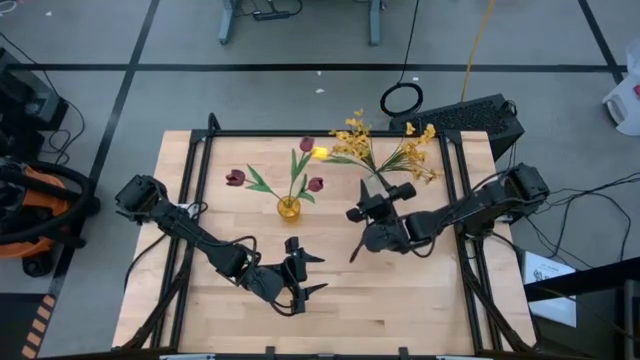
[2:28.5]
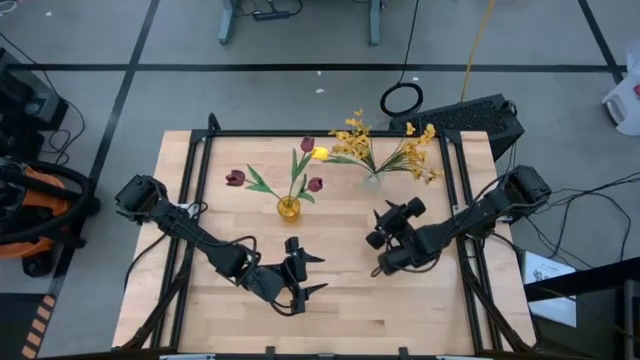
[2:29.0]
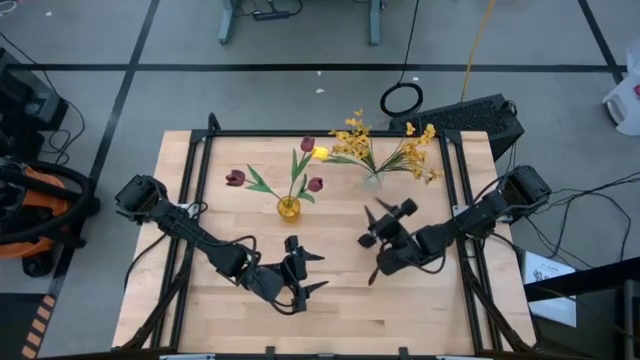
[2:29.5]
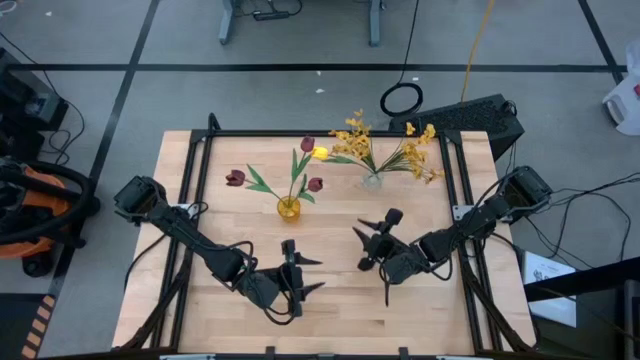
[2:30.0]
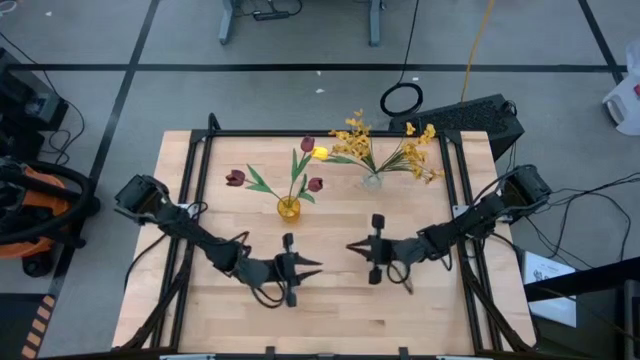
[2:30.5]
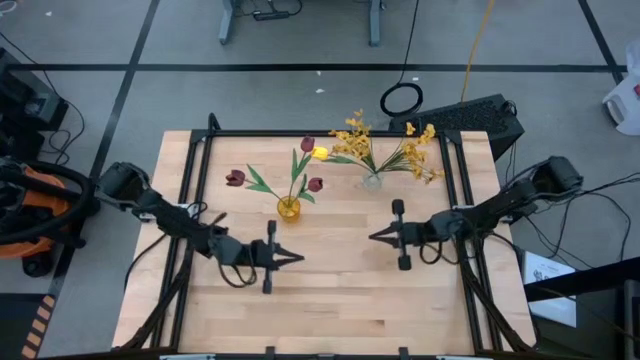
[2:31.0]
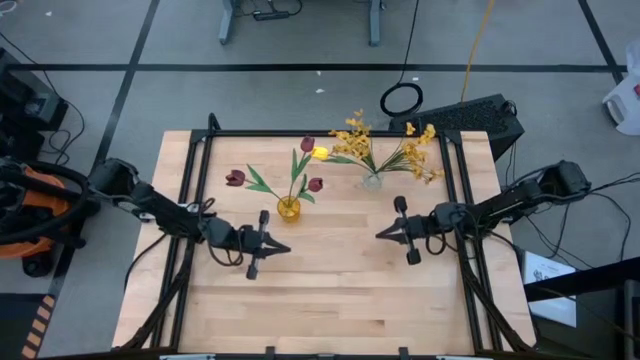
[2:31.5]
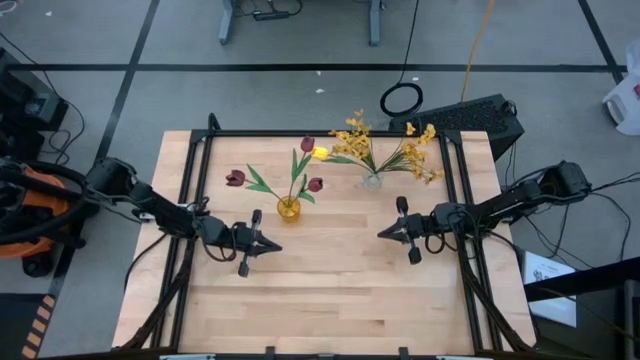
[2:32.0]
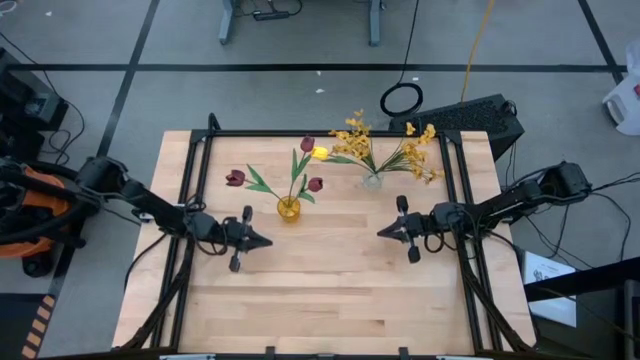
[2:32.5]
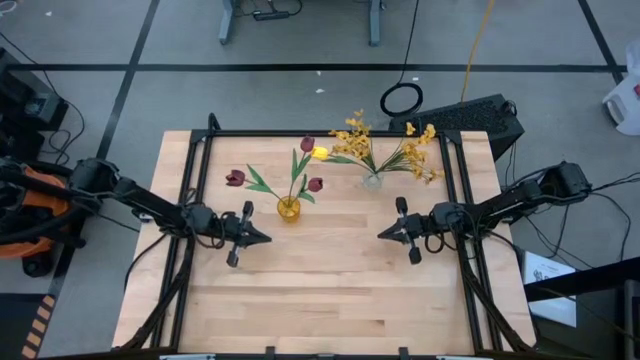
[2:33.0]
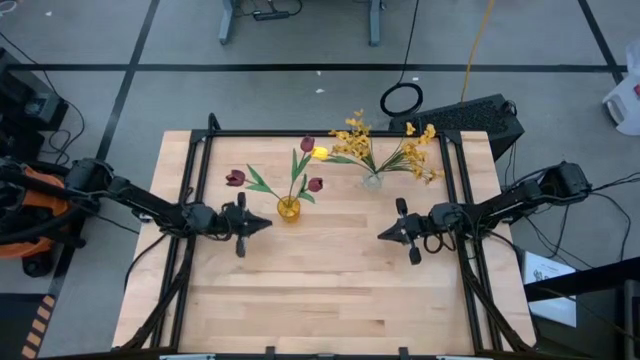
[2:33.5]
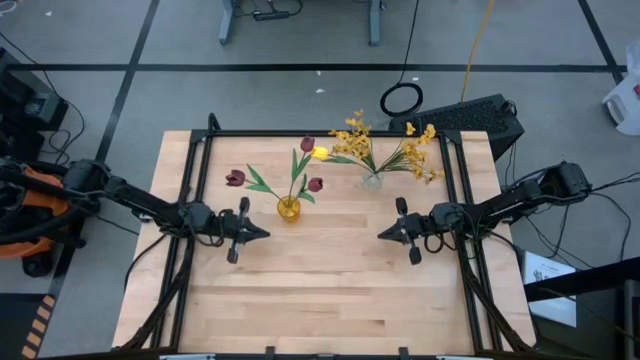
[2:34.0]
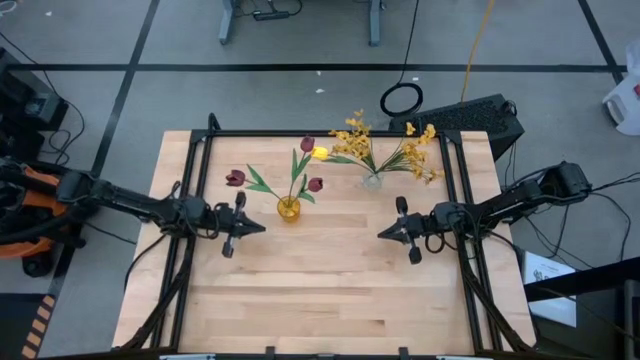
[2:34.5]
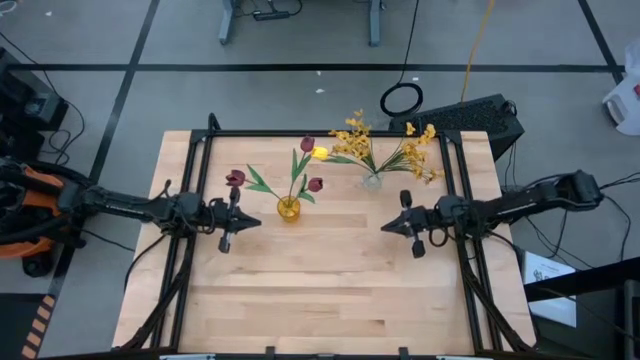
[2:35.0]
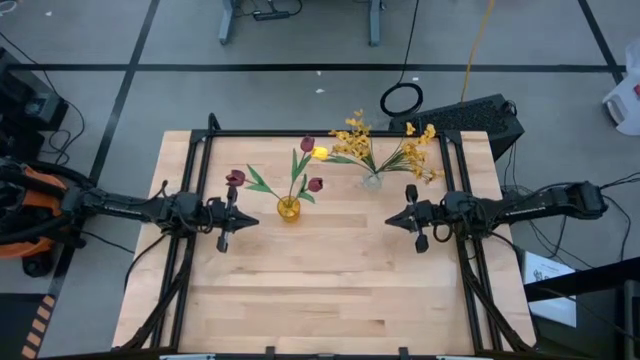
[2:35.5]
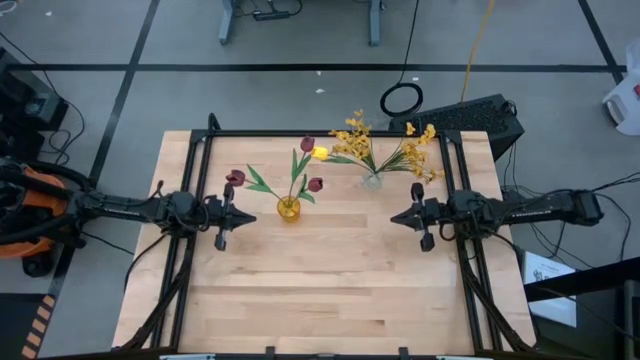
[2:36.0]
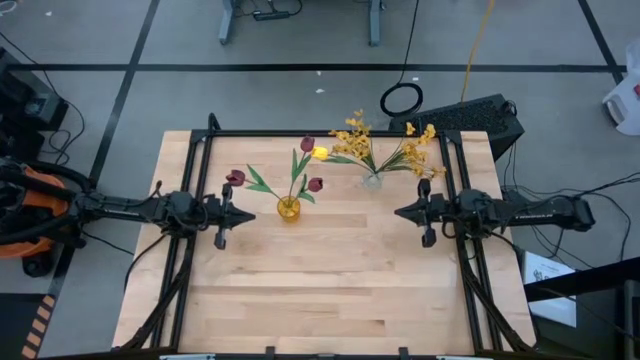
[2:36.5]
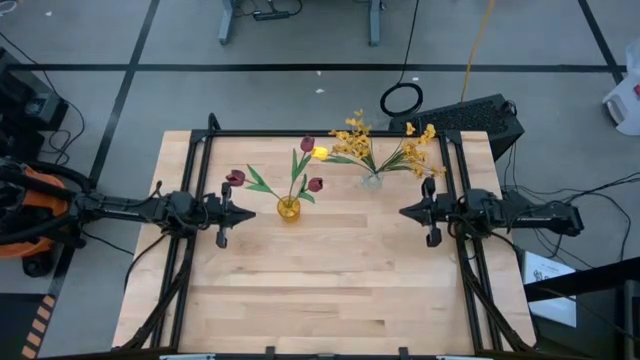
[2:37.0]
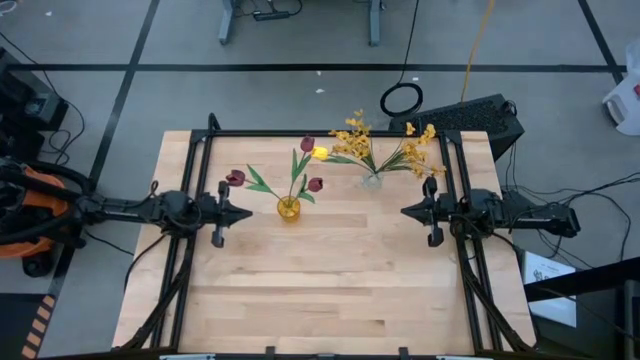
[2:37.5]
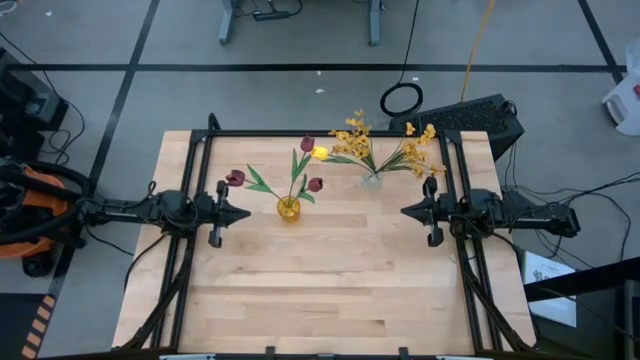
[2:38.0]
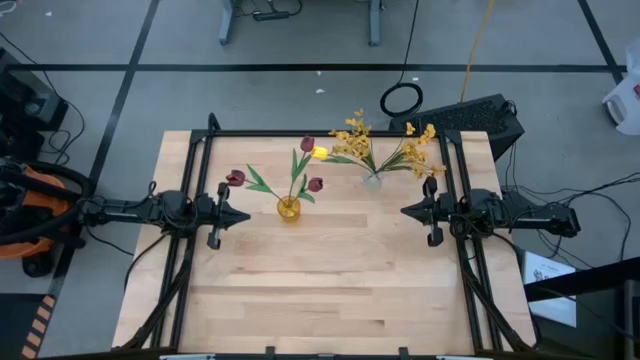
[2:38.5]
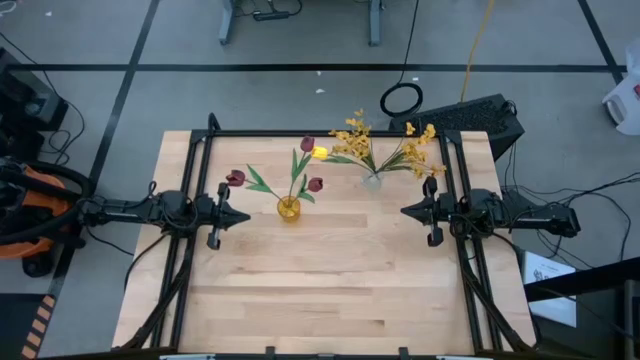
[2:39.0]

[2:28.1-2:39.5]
Task: Sort flowers into vase by color
Return to Home Position

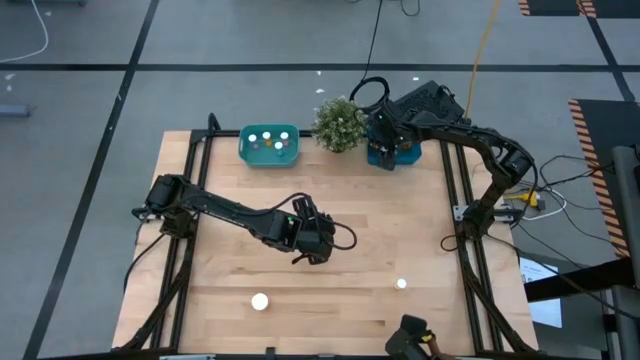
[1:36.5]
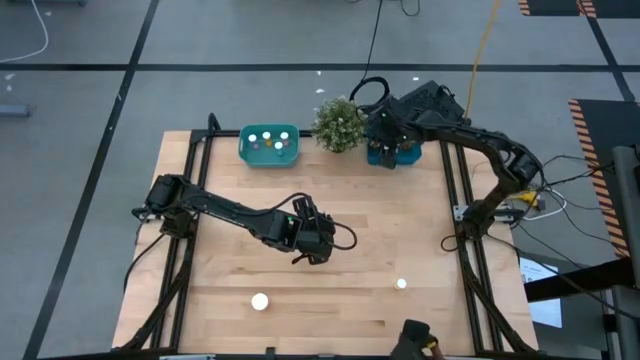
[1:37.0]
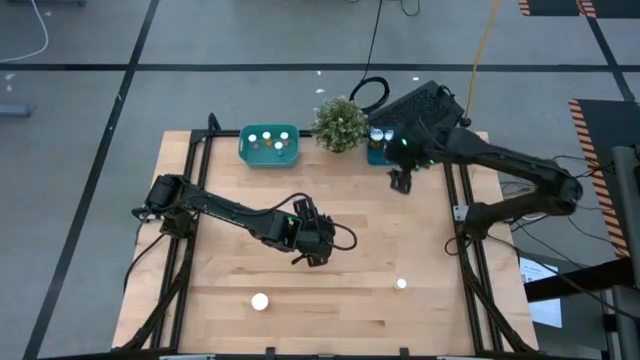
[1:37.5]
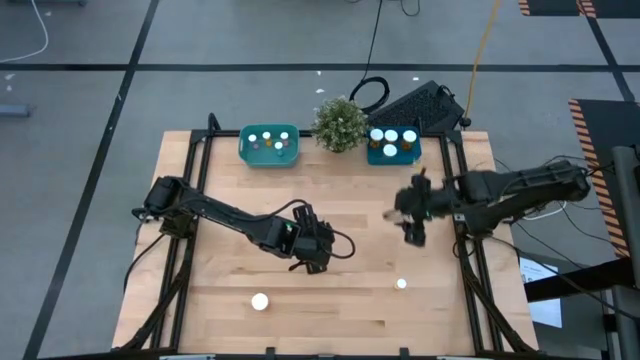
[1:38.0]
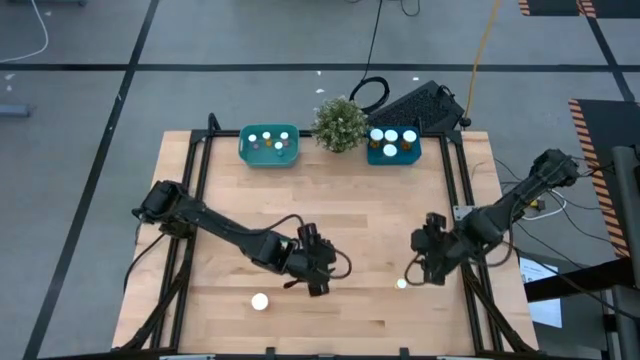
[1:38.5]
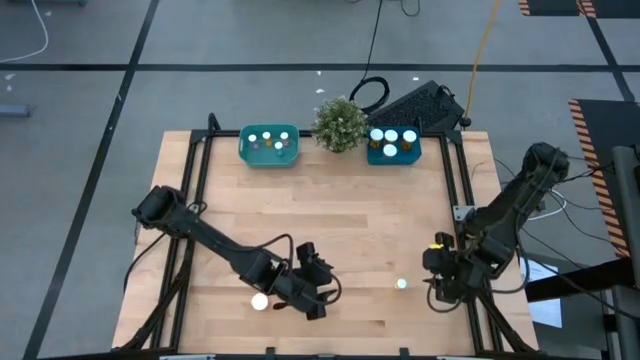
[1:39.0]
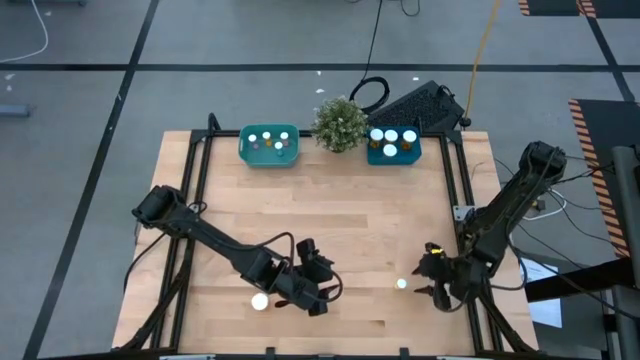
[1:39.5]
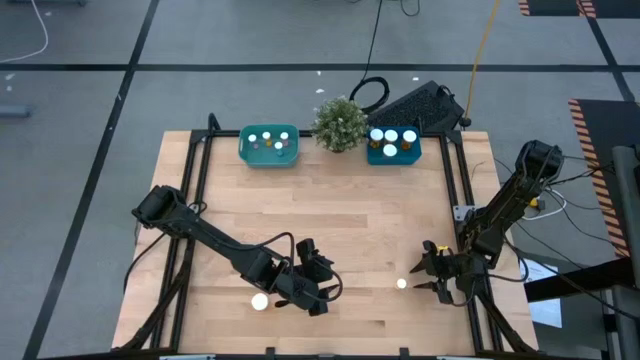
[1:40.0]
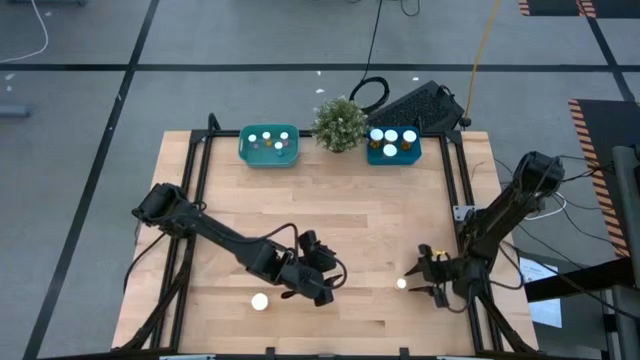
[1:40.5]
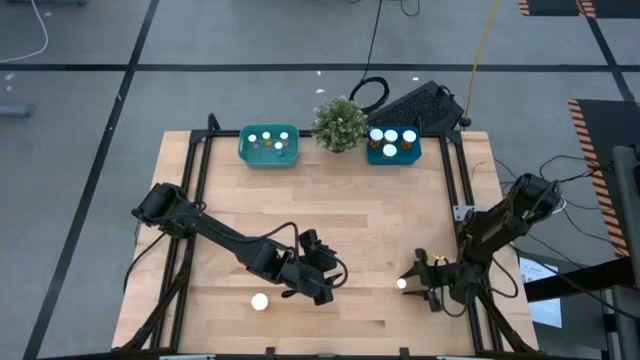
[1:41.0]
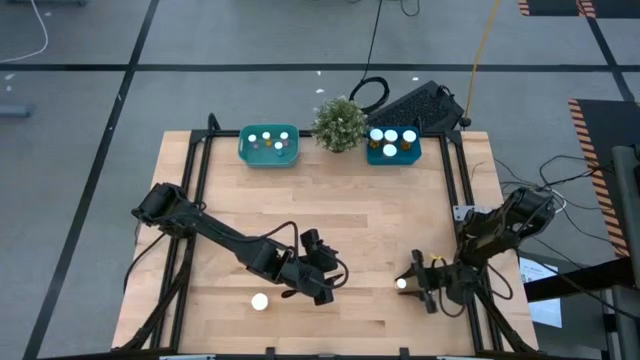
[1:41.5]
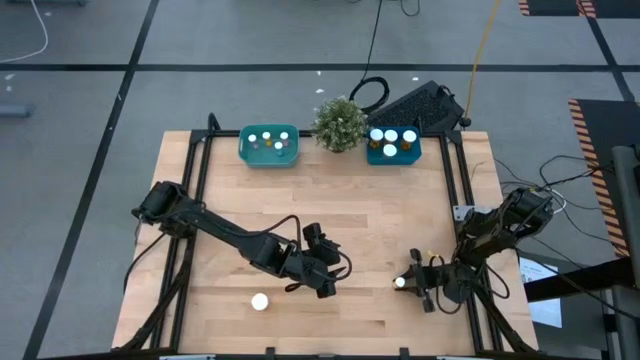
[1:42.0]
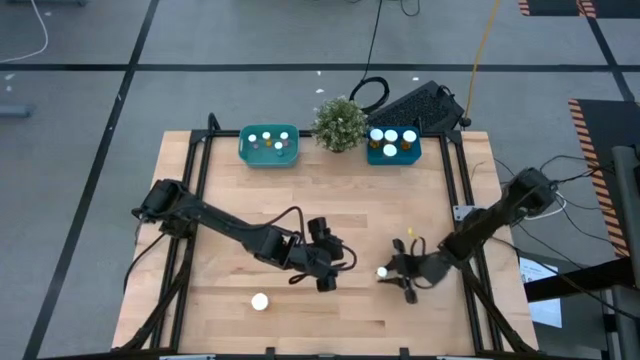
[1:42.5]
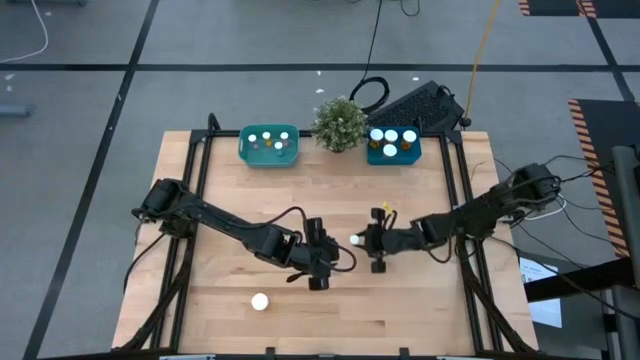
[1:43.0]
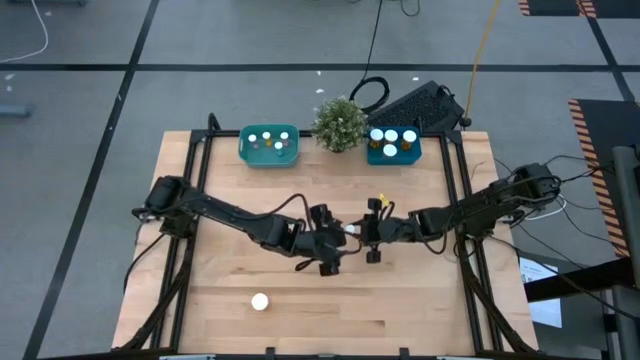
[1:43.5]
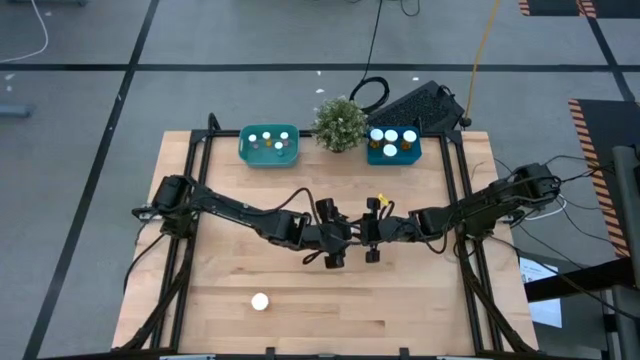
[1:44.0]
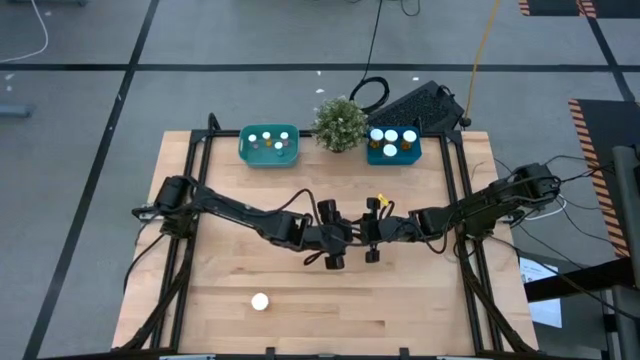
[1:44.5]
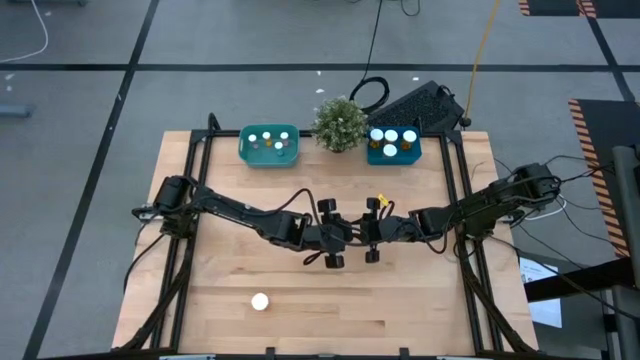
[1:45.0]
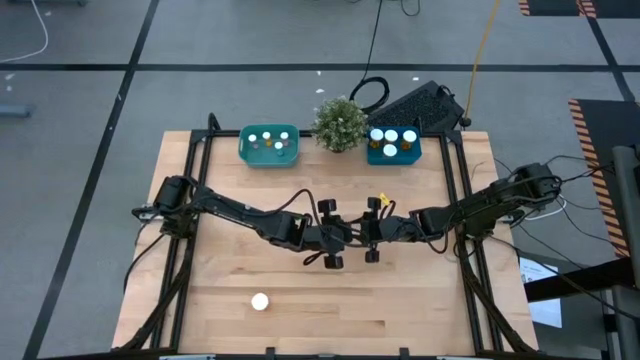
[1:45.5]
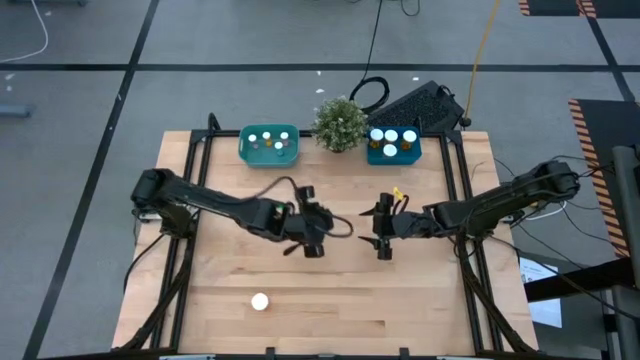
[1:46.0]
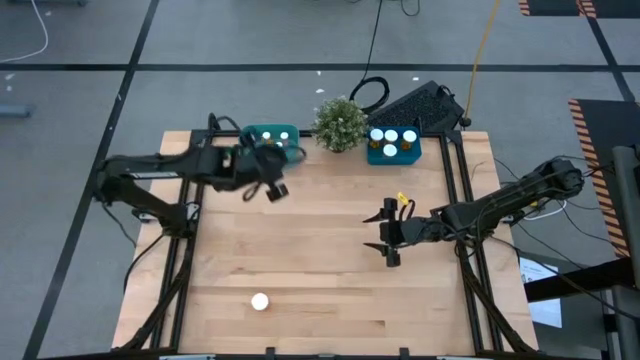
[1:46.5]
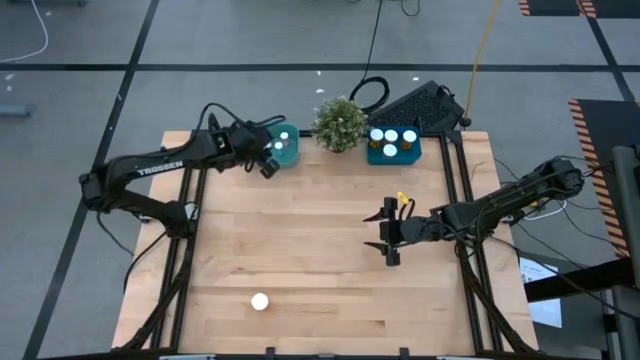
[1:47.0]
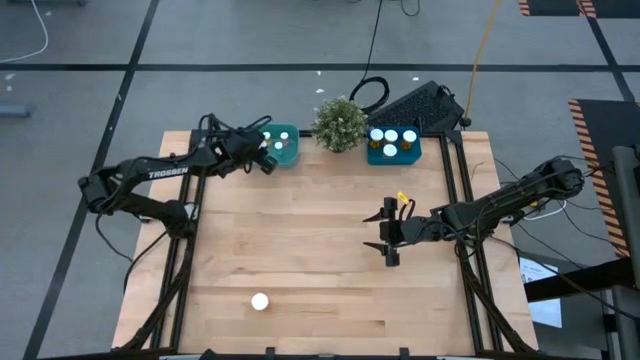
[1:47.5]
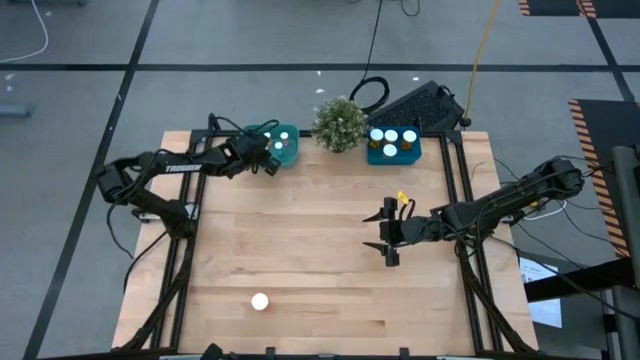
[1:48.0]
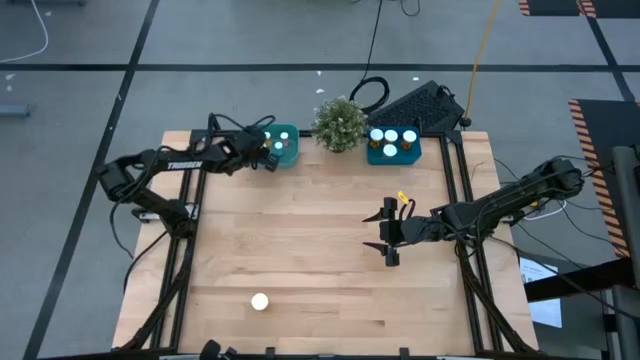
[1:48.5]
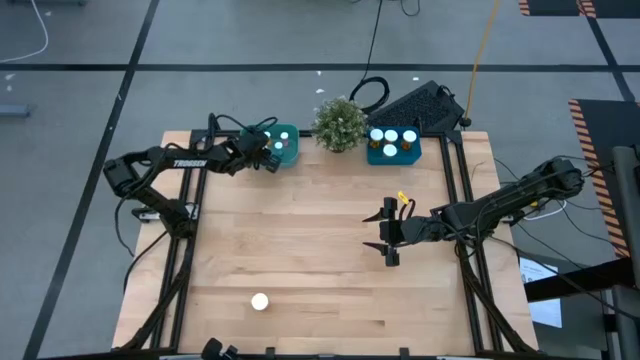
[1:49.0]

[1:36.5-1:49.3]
Task: Pick and place medicine bottles into bin by pill shape (circle, oval)
Put the small yellow pill bottle into the green bin
